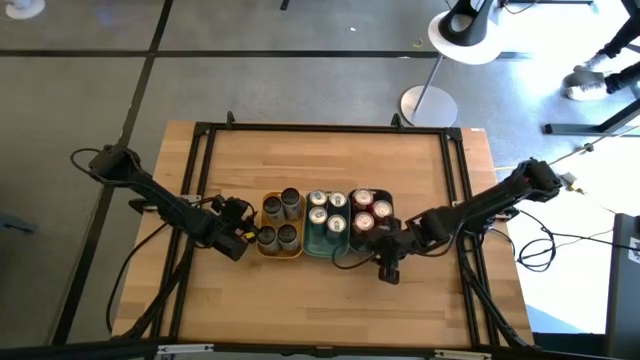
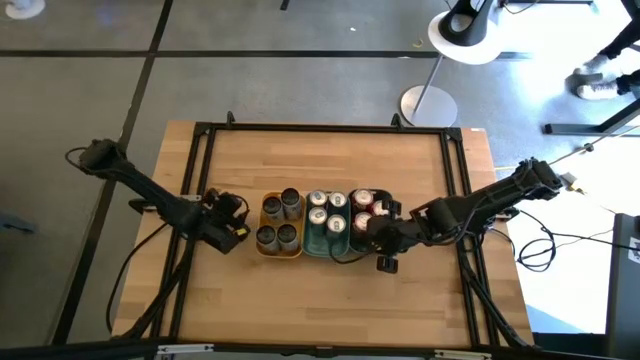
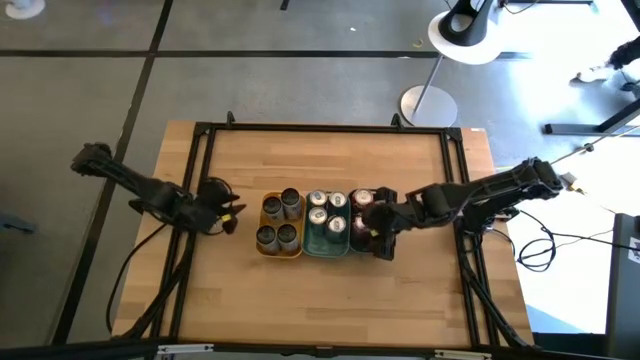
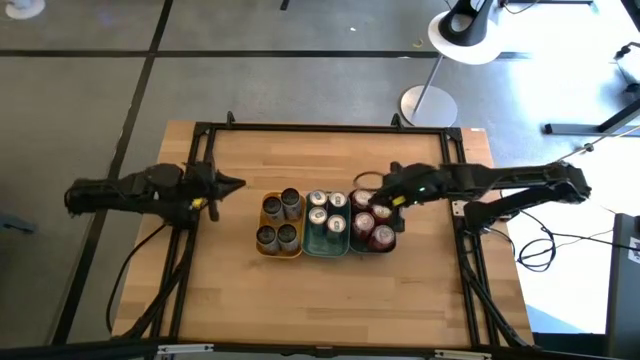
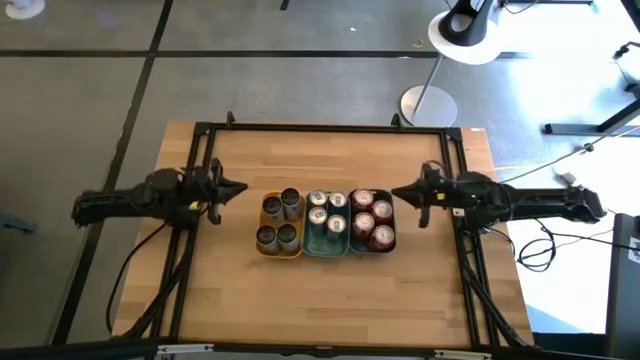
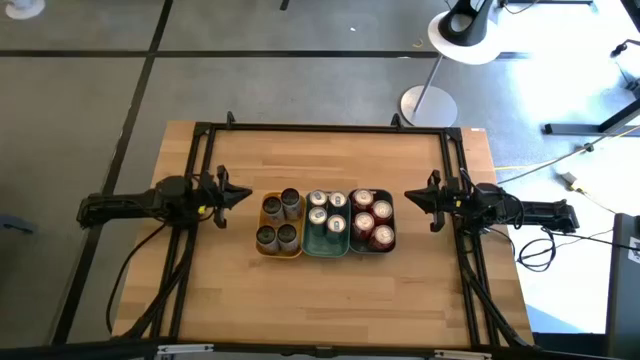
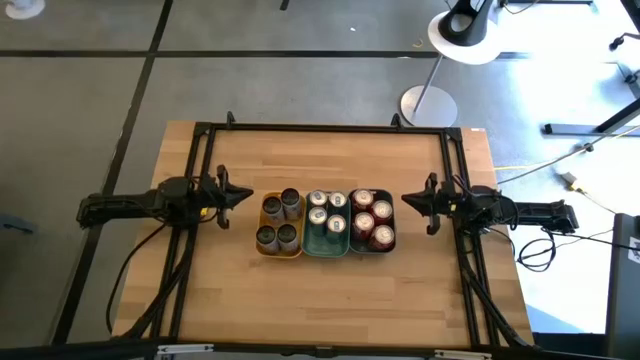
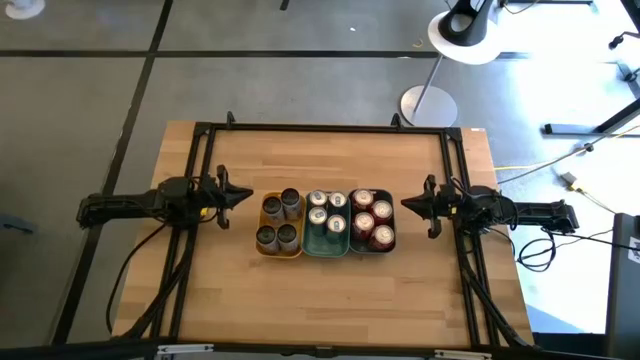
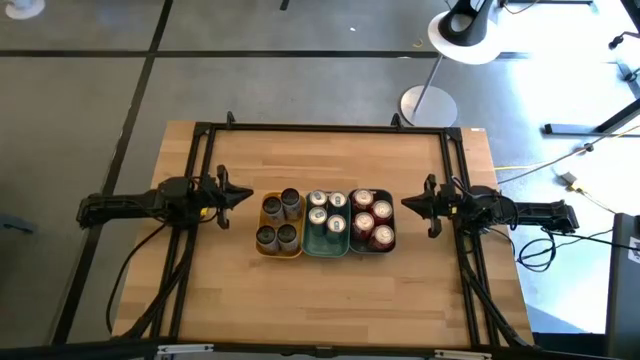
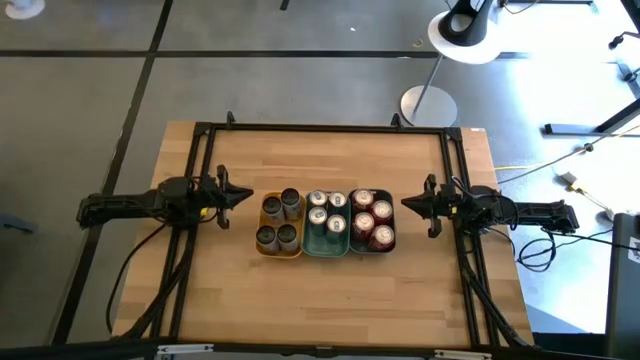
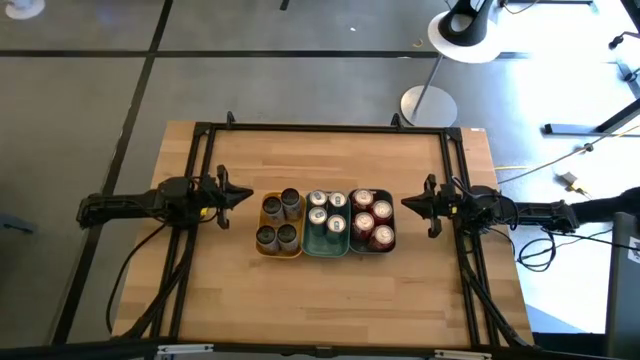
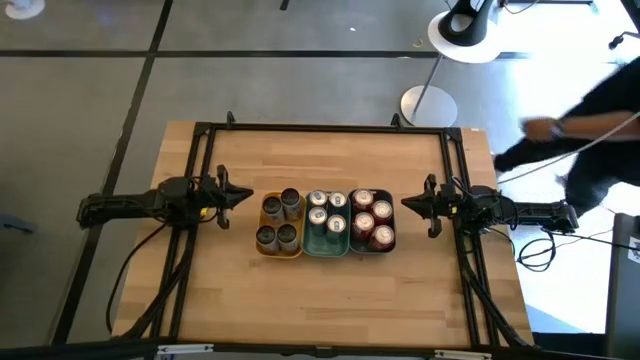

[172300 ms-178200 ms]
Task: Sort soda cans
Return to Home Position

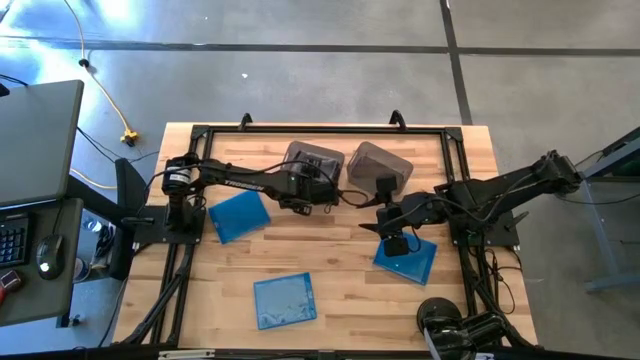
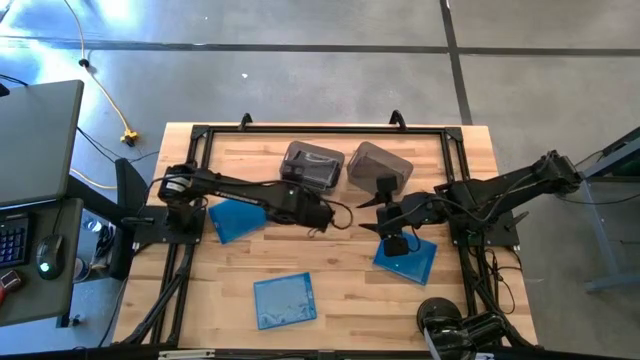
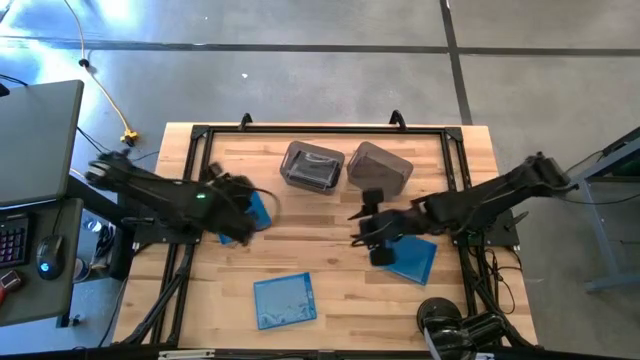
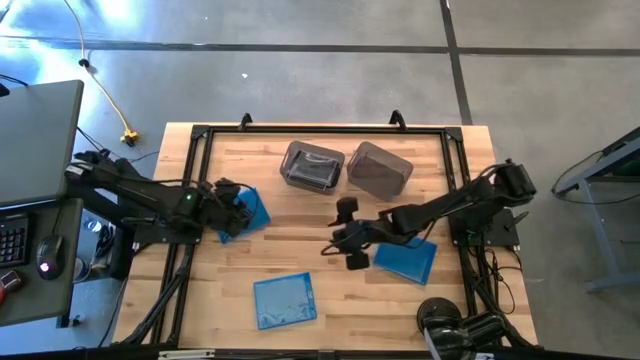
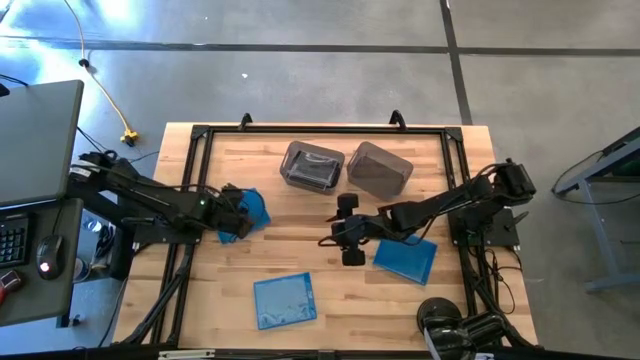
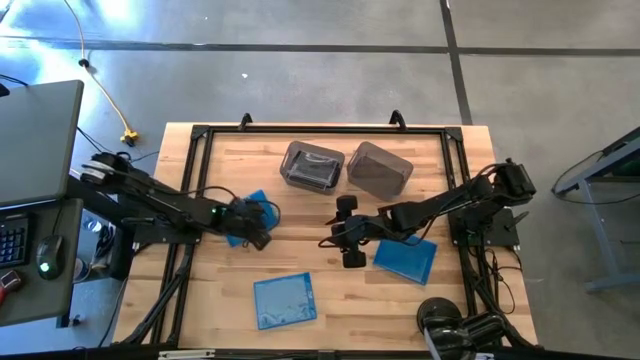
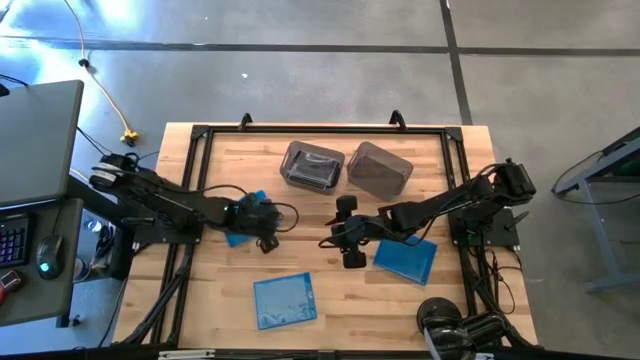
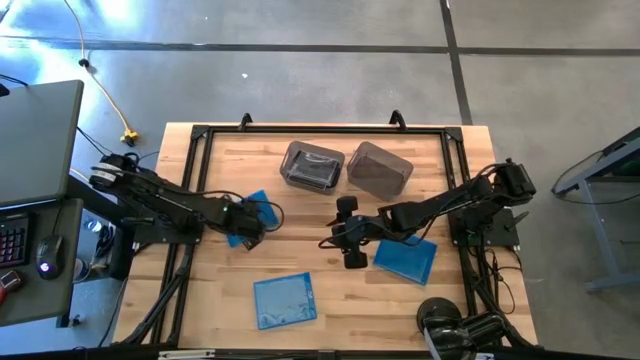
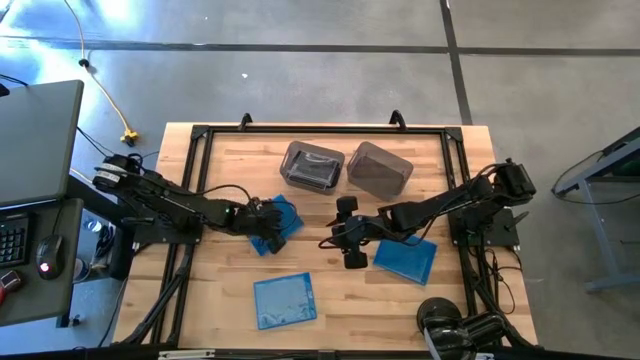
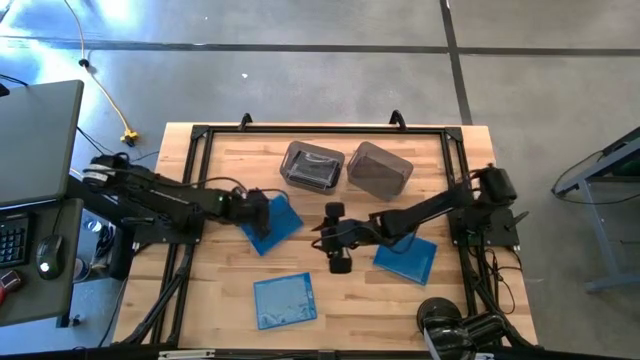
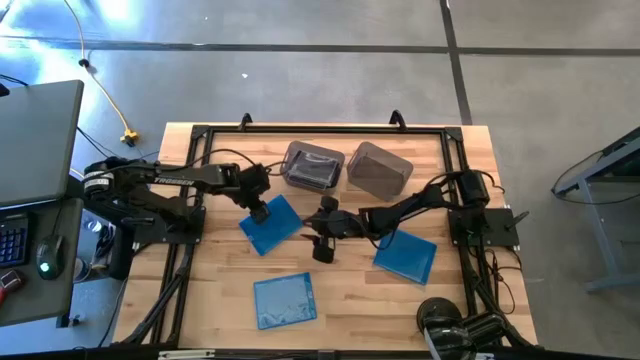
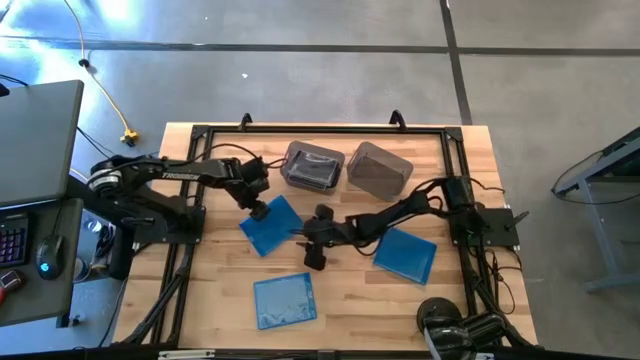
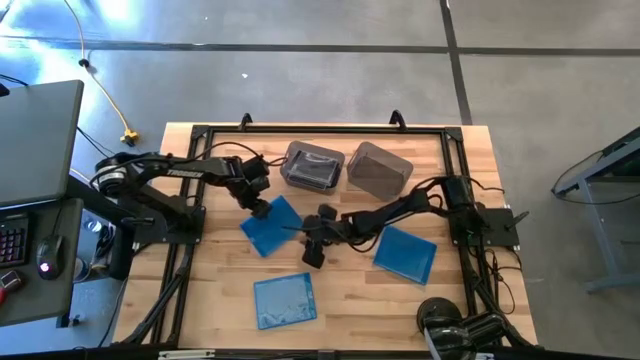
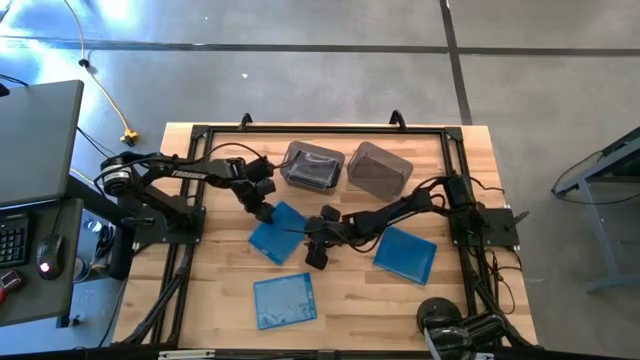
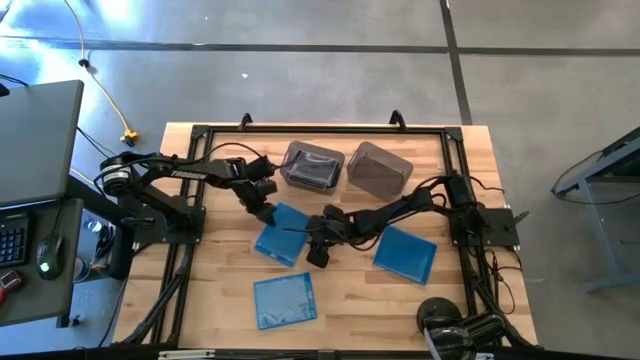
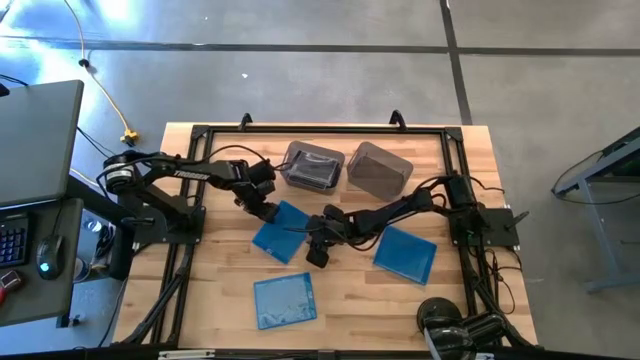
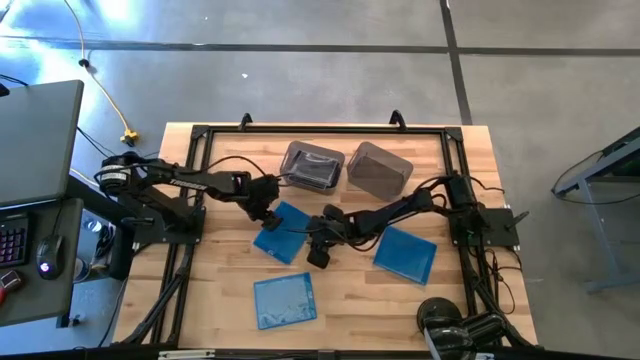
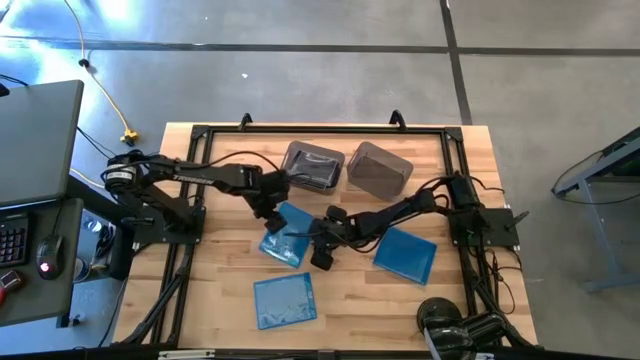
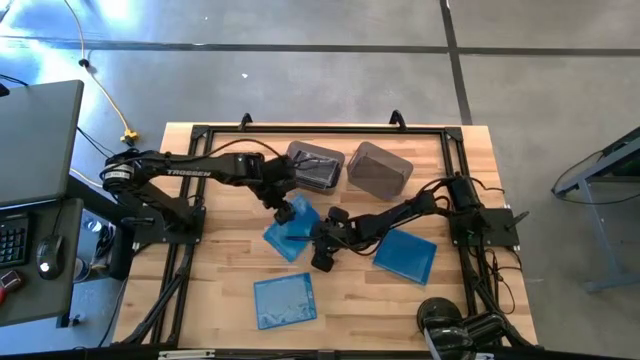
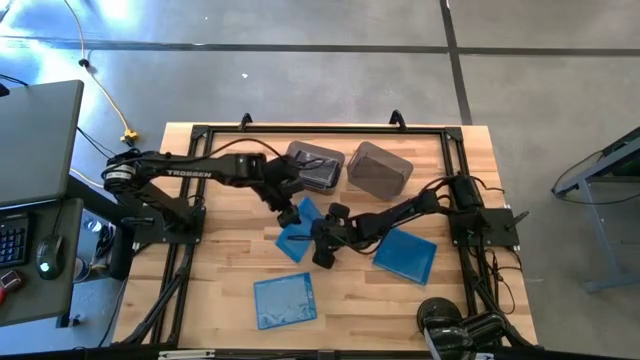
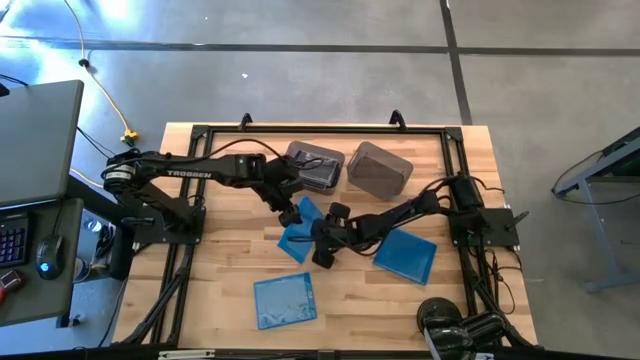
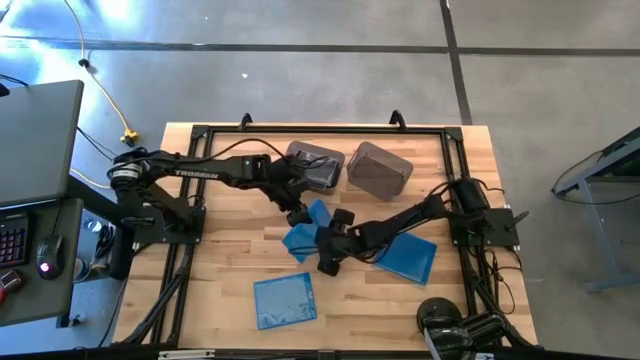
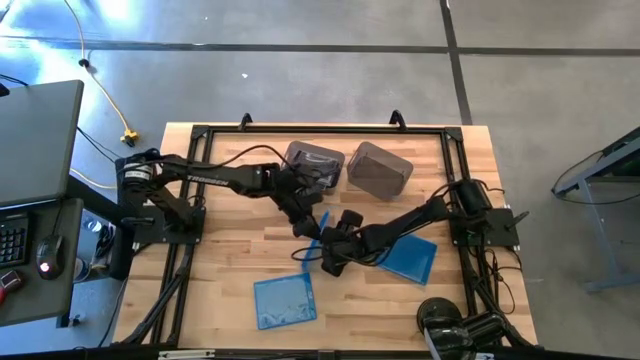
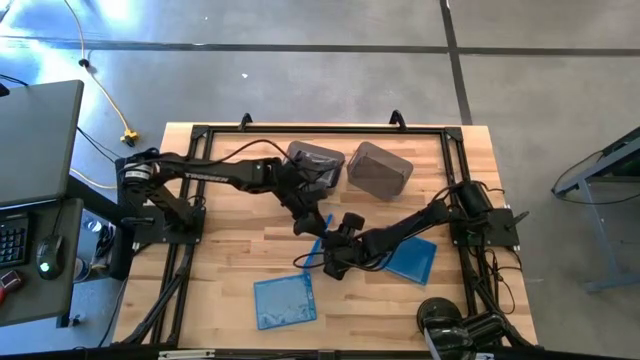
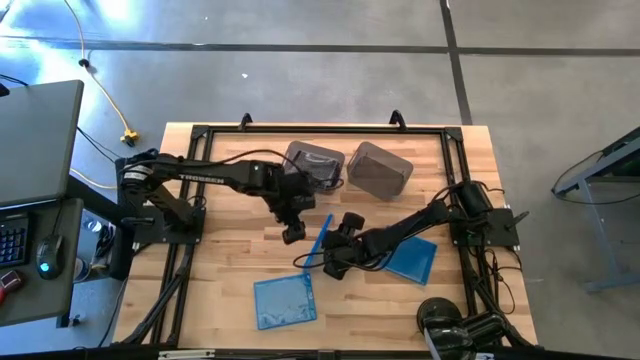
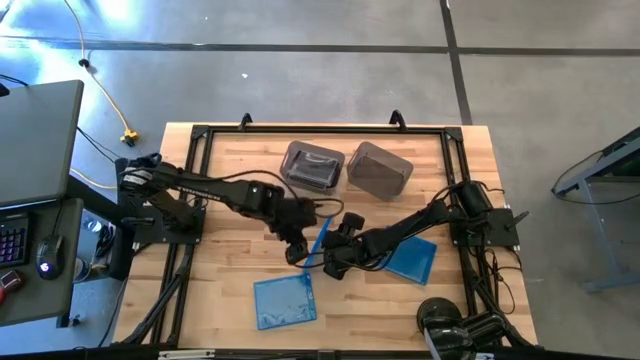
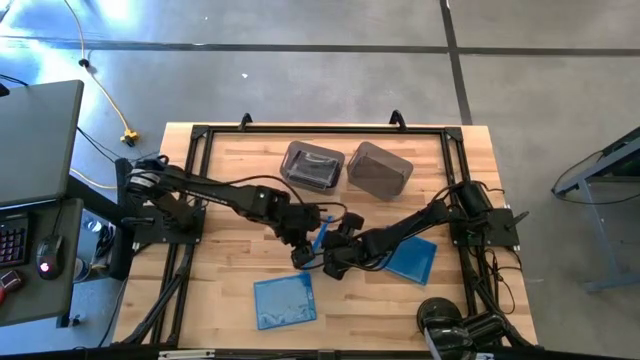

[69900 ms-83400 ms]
Task: Pick & place jewel cases by type
Put the top left blue CD case into the right black bin
